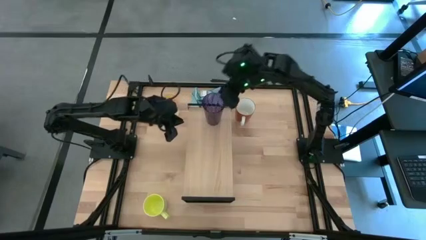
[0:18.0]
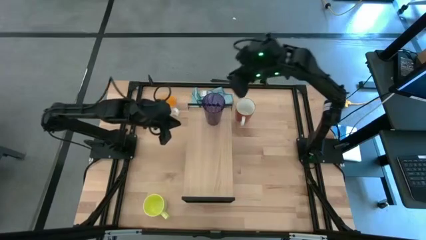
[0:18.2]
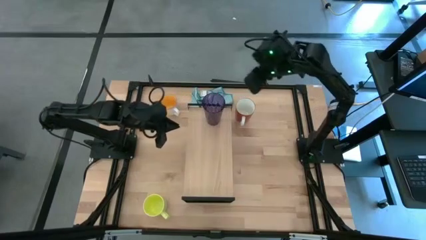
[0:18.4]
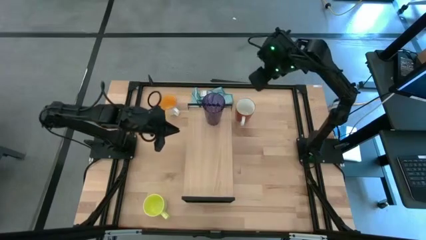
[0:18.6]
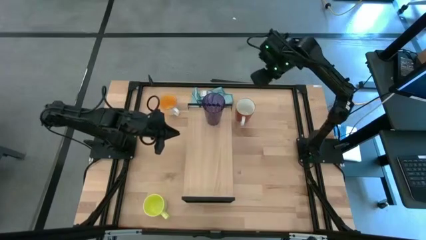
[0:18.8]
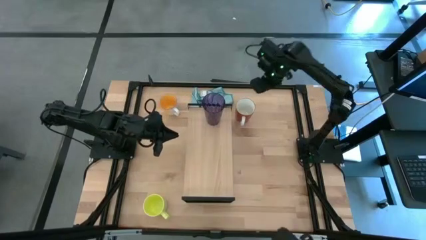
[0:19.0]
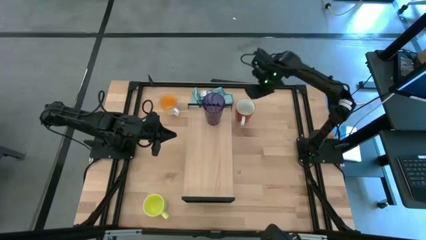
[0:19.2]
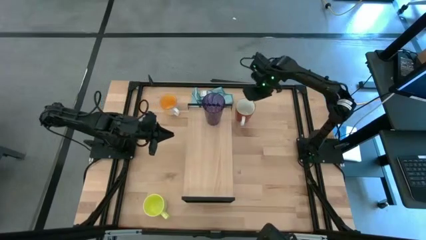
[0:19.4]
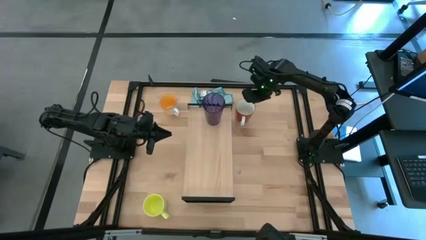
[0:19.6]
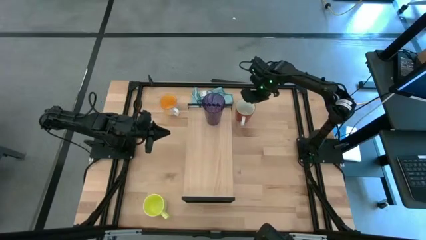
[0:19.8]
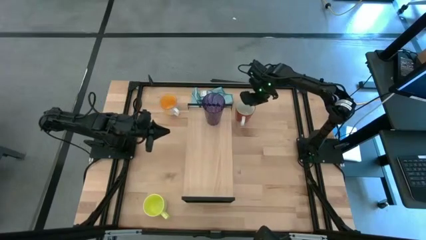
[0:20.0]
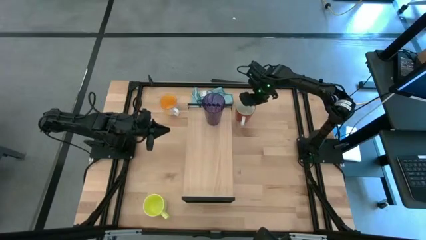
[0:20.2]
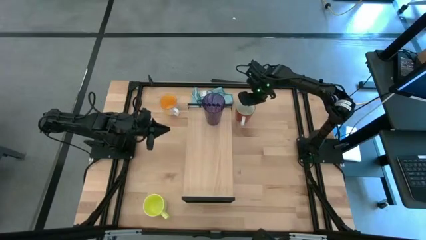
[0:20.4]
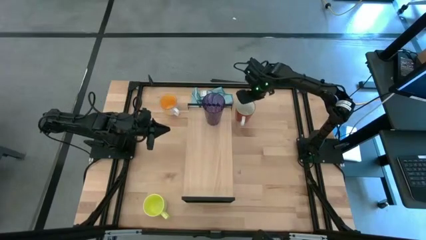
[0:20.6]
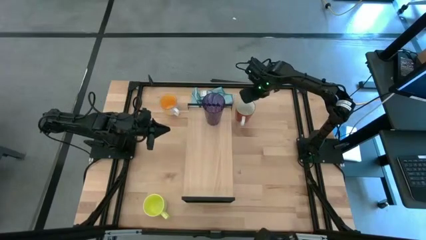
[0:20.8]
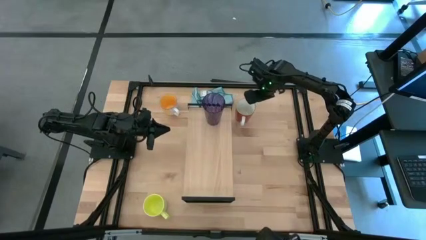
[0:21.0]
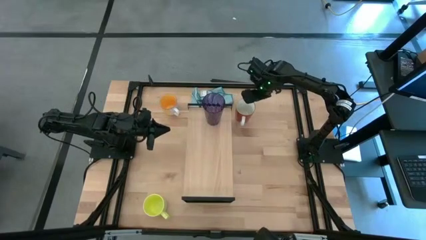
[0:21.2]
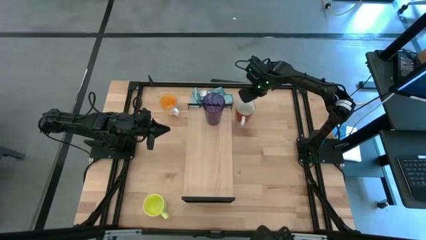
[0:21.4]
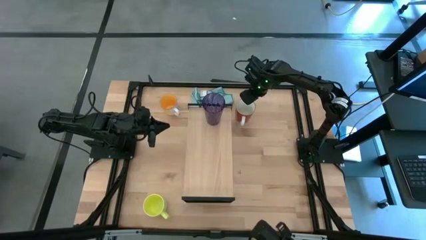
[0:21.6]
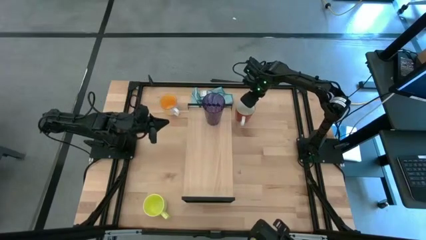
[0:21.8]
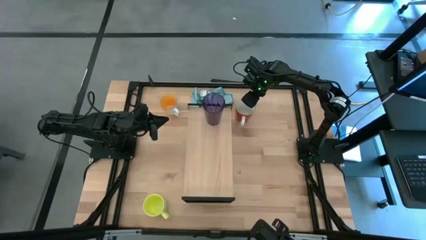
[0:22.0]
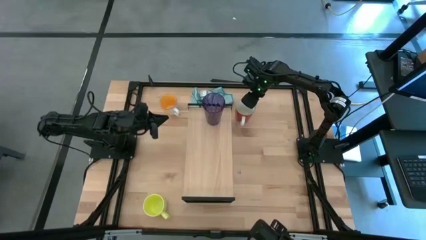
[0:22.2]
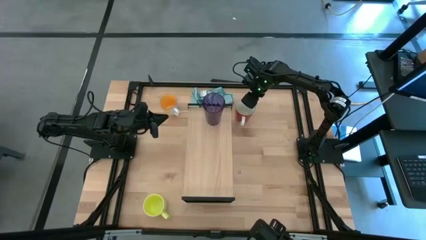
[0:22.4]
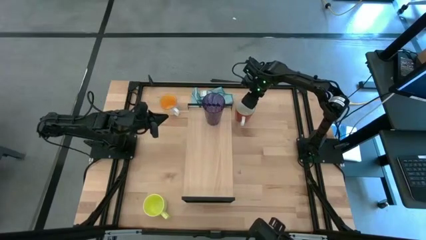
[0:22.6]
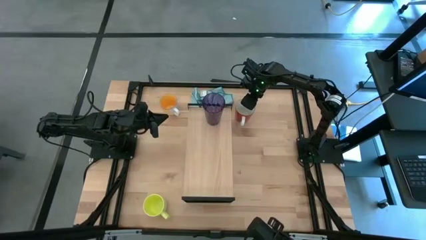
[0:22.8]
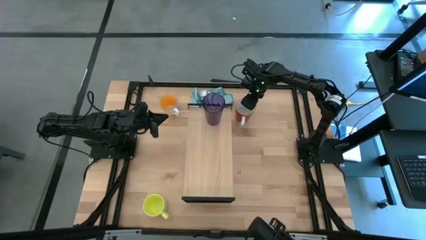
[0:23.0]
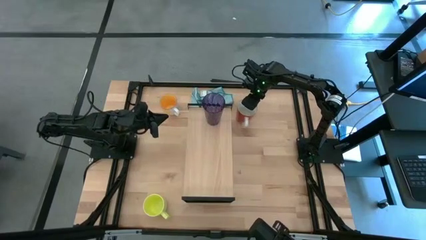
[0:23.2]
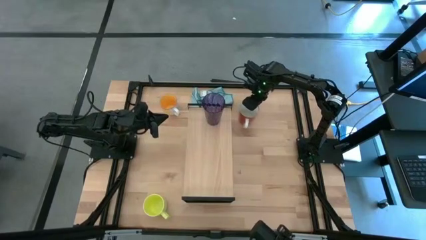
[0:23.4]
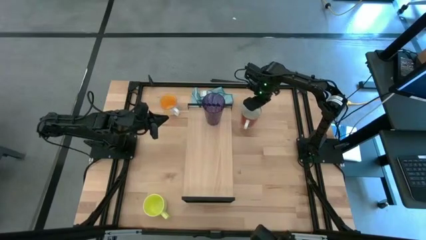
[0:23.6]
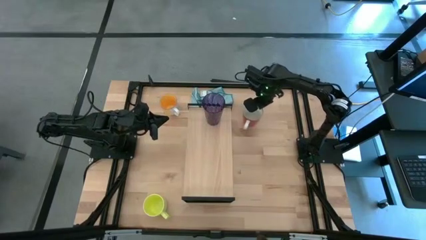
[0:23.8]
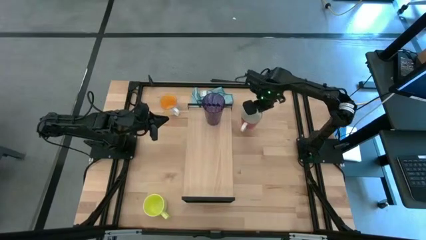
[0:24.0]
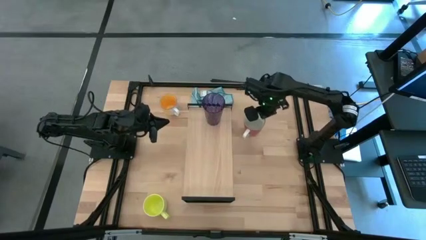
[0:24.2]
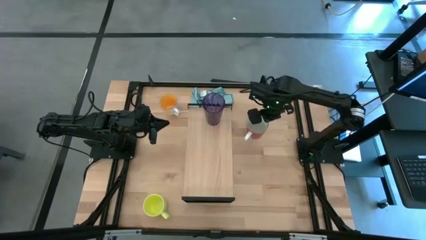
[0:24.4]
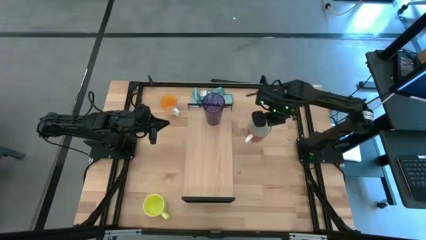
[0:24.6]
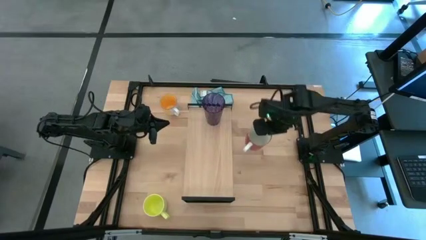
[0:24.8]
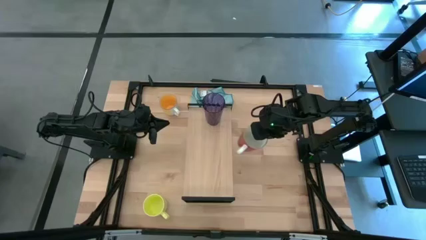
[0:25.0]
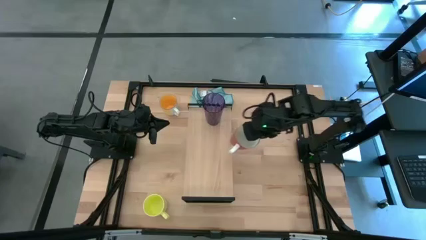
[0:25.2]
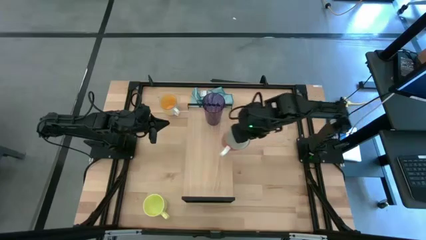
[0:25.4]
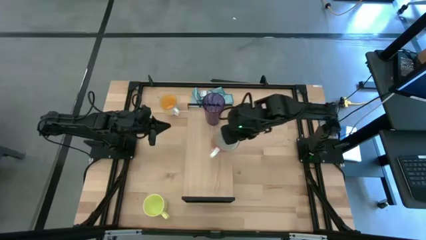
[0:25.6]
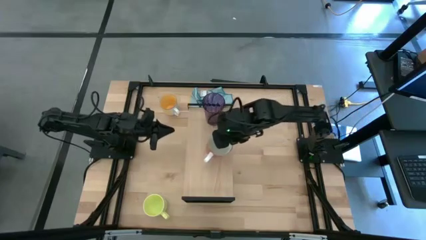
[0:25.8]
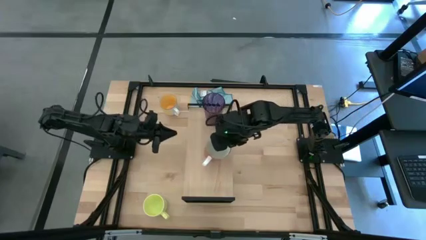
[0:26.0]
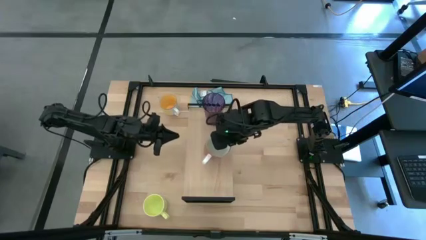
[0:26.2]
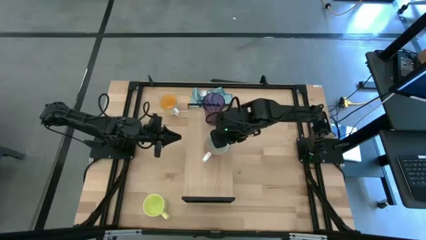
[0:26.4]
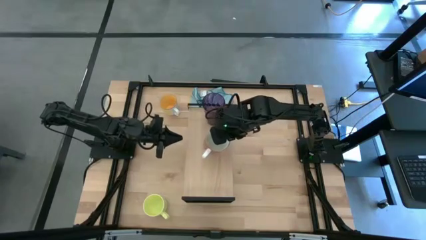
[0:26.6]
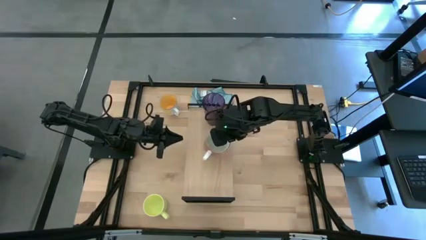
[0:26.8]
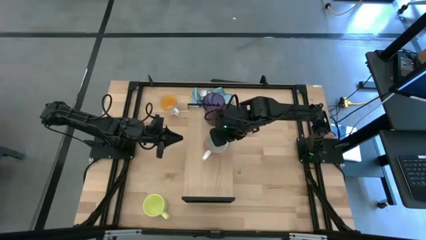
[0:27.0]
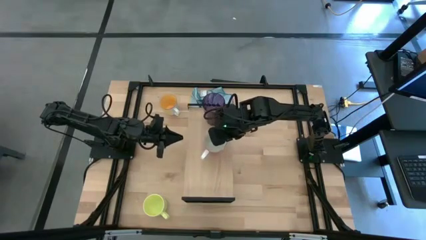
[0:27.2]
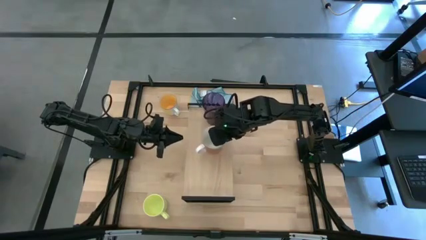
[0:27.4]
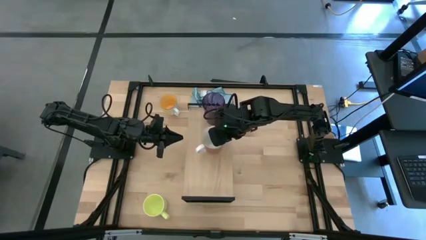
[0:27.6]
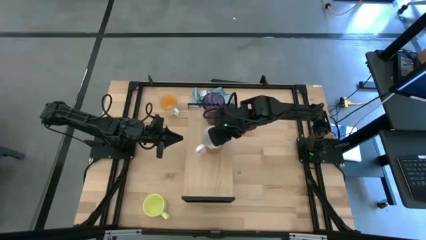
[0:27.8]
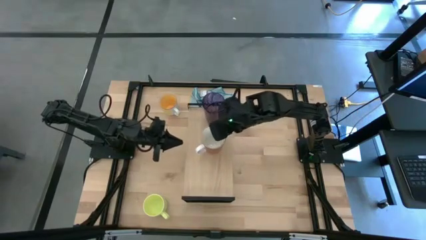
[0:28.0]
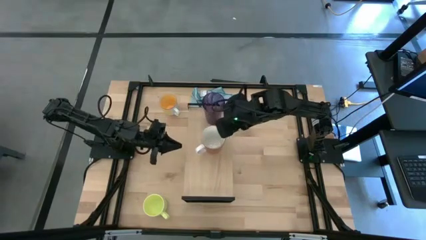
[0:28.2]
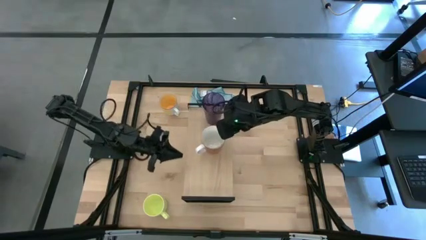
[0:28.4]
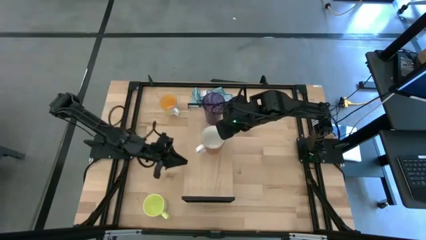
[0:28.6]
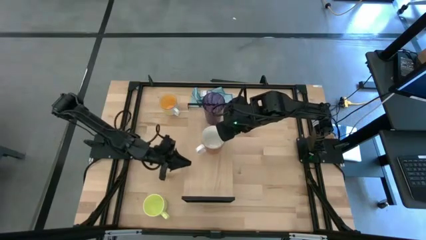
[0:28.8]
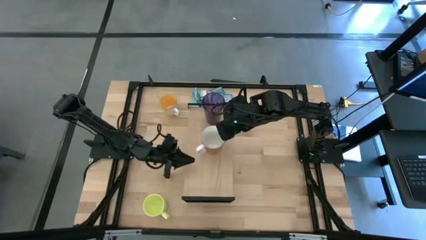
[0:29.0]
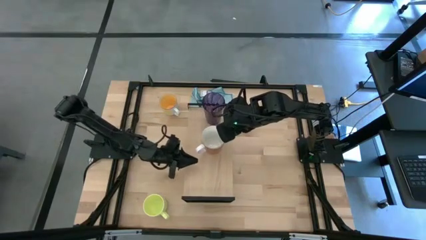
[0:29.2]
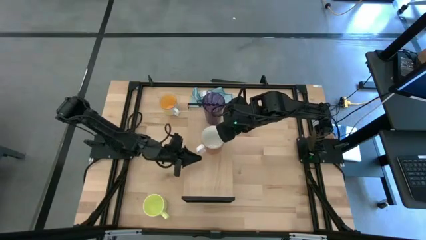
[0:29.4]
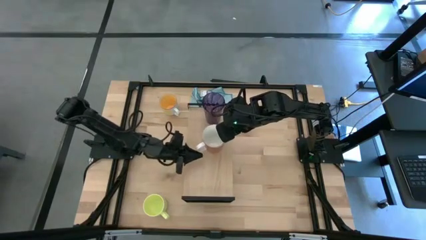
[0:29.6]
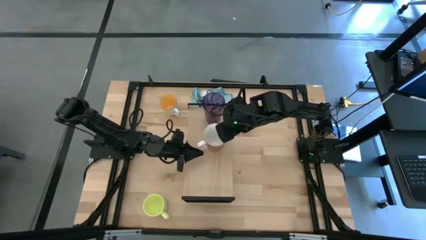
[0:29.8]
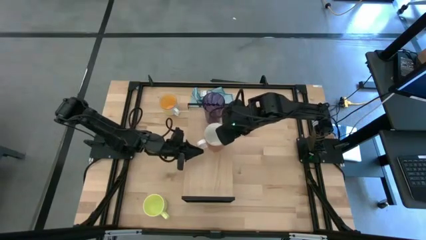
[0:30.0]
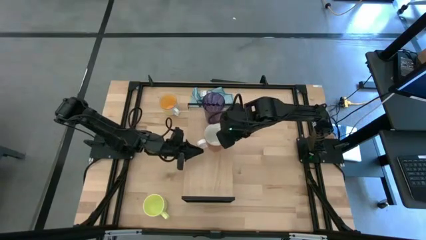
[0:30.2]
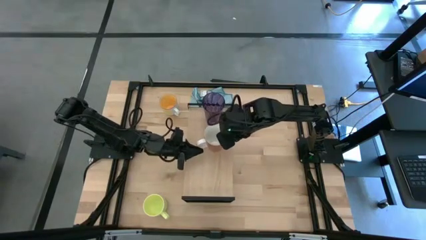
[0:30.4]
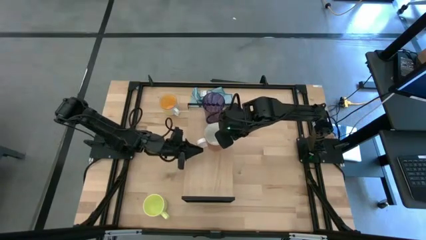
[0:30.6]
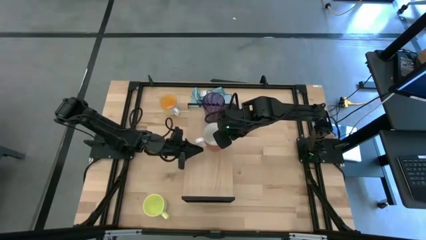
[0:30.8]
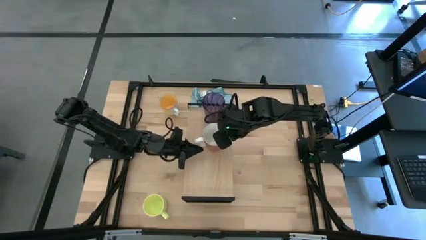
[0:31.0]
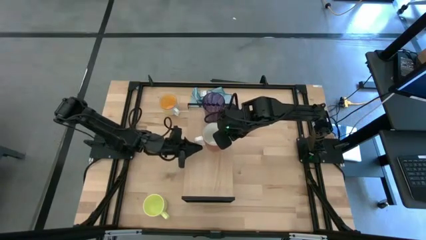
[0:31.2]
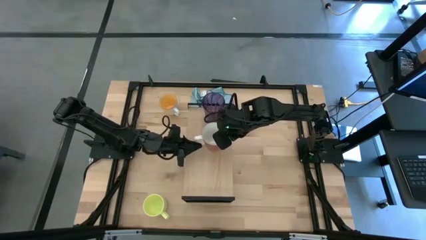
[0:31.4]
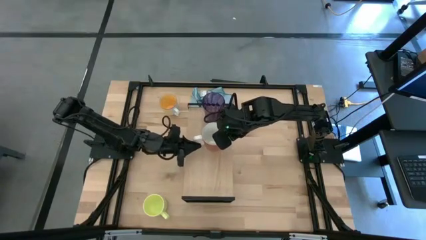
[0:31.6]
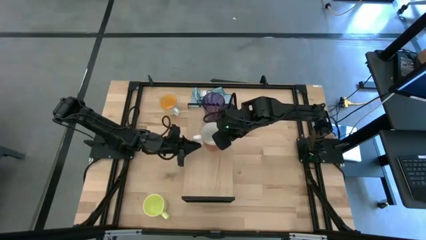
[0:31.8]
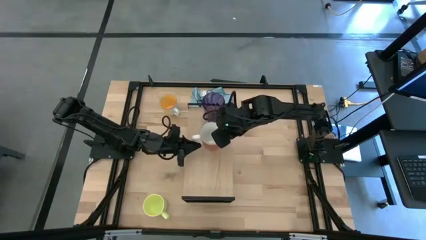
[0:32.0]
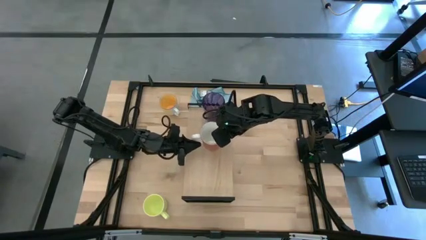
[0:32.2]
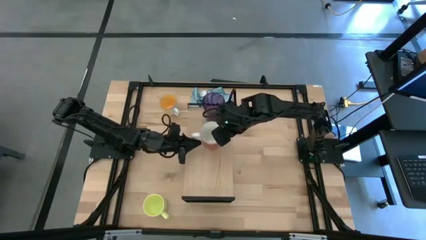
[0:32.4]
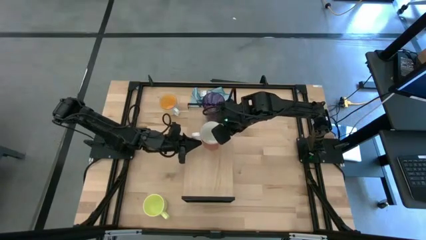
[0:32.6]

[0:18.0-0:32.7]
Task: Stack small to large cups/mugs on shelf
Put the brown cup on the shelf
